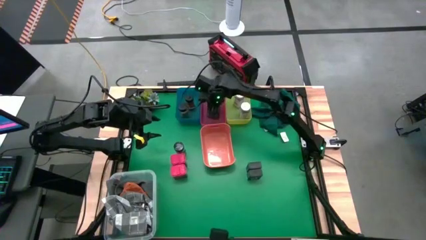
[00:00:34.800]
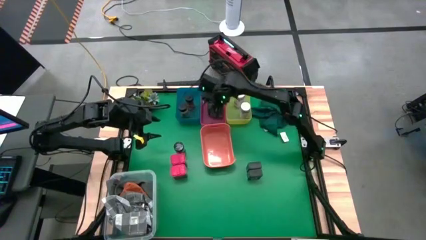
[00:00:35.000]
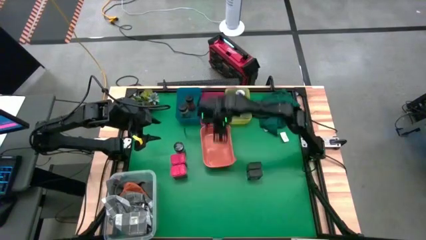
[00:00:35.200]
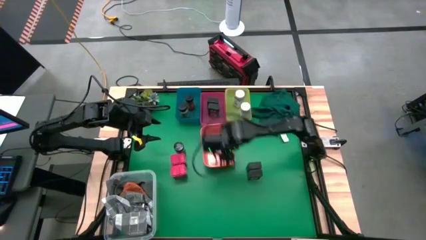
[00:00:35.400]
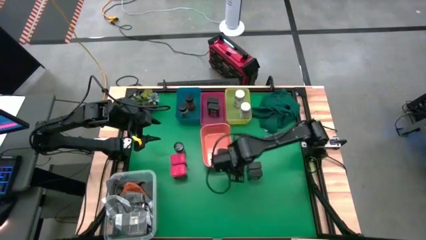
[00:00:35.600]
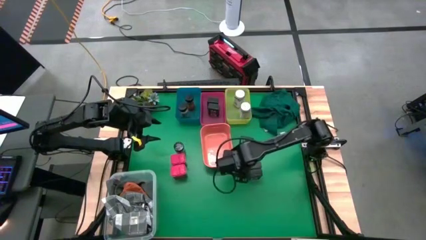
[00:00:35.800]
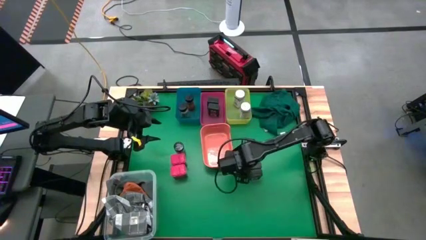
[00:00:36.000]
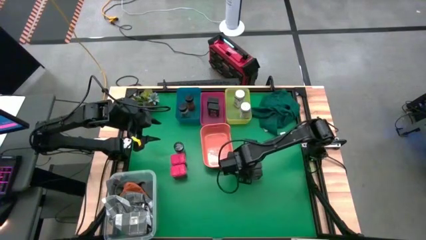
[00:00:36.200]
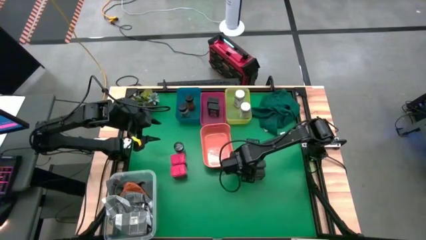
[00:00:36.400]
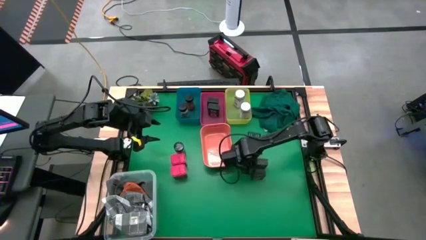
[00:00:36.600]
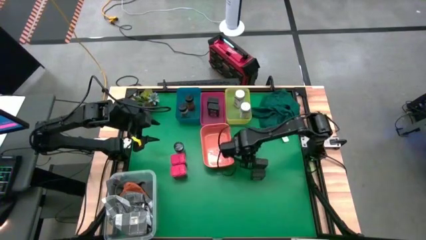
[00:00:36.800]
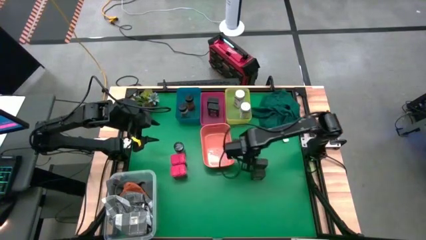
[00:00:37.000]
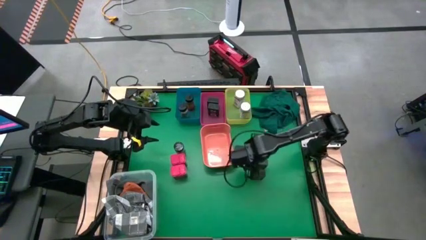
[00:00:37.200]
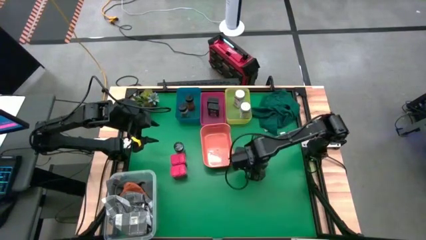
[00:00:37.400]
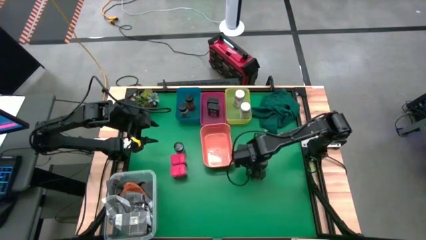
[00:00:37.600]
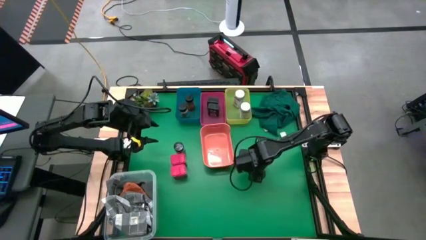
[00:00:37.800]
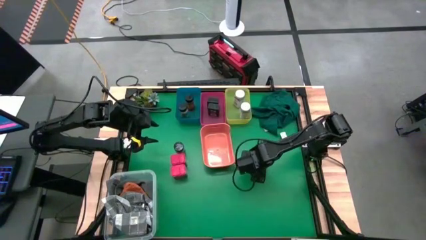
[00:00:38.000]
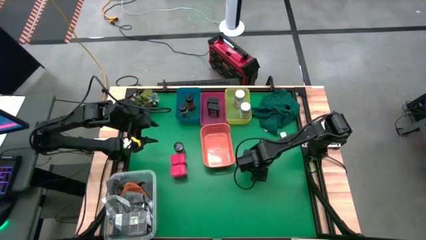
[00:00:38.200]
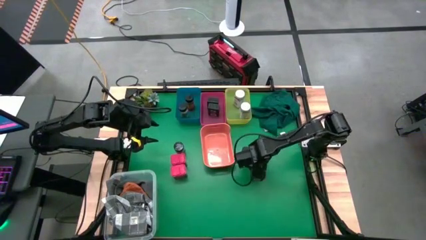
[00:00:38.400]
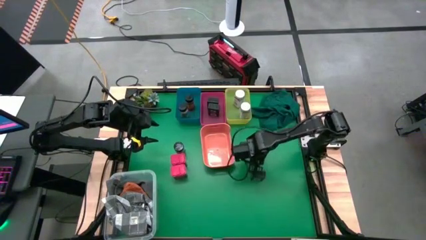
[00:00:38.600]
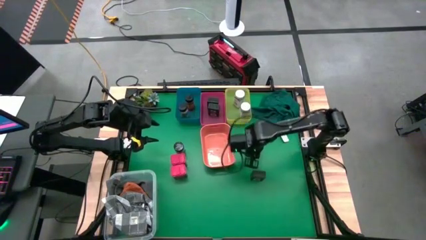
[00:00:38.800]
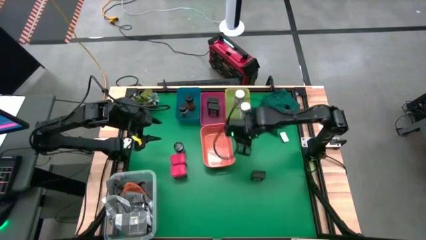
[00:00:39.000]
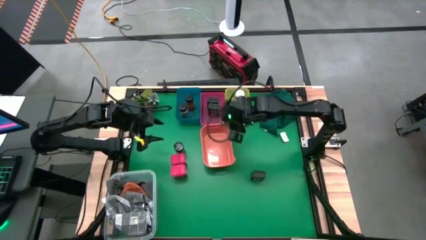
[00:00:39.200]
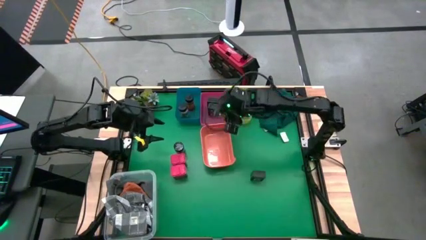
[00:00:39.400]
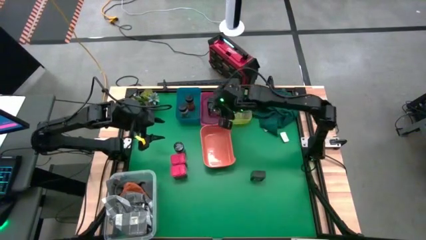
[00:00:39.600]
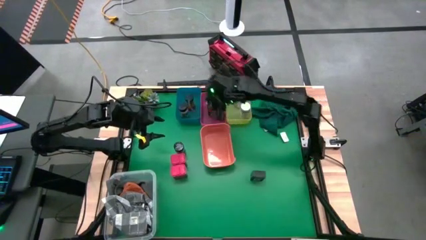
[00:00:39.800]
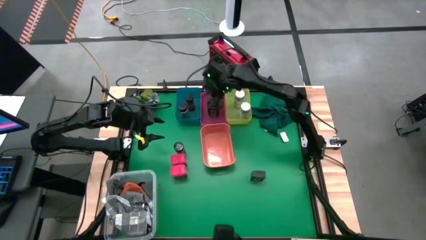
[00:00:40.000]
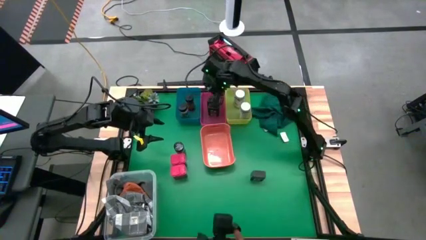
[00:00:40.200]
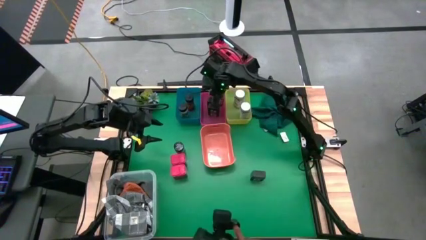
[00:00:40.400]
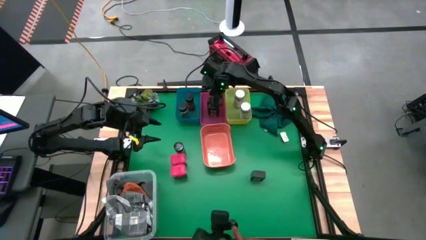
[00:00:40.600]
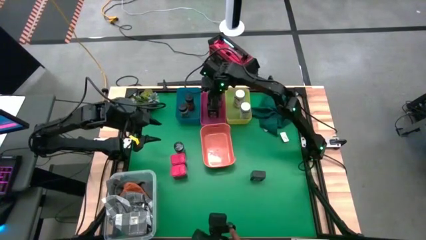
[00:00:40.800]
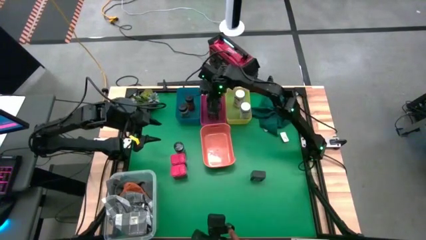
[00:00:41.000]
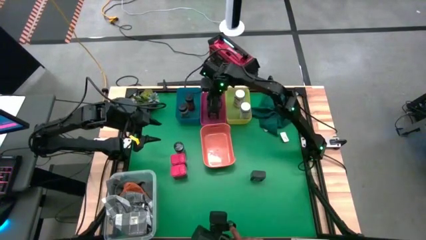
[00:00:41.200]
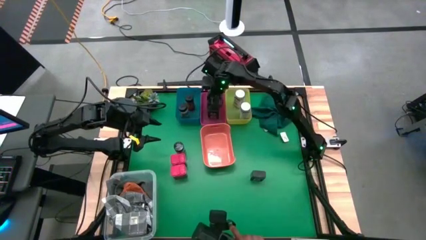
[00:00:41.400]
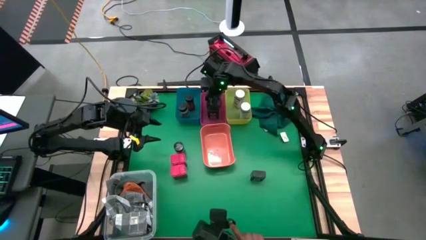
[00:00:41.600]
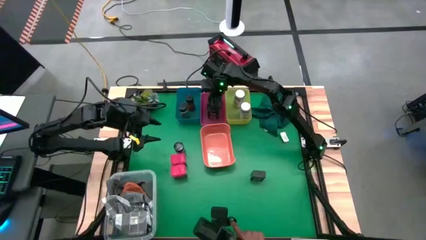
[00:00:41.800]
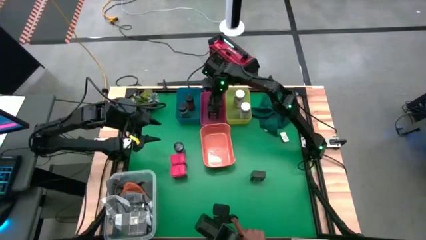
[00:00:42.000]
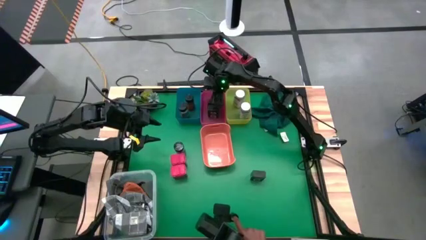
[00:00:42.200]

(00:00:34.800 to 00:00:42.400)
Task: Sort spices by type
Put the top black seasoning can into the pink bin

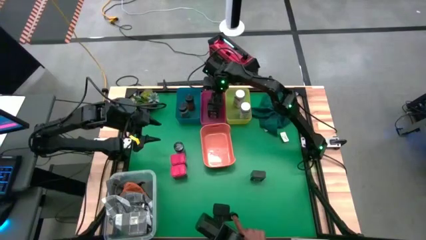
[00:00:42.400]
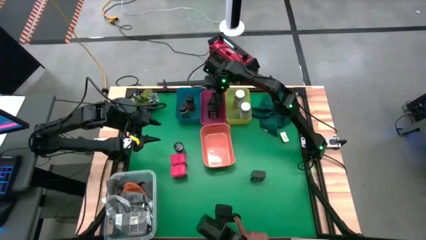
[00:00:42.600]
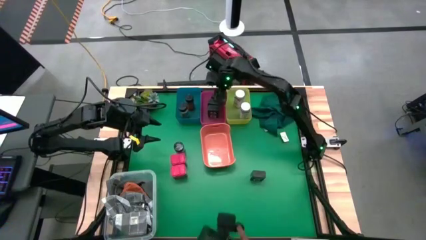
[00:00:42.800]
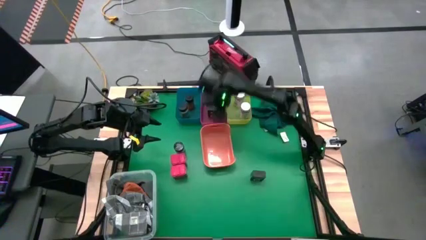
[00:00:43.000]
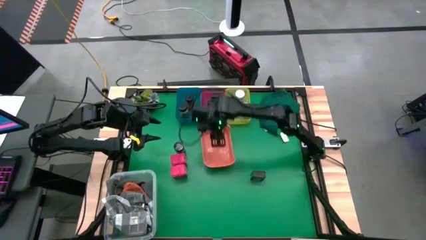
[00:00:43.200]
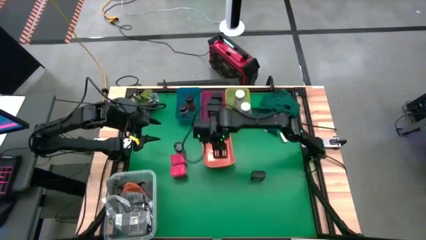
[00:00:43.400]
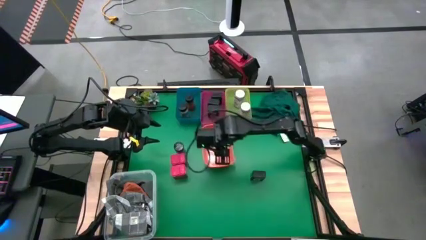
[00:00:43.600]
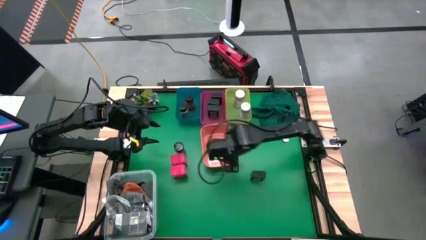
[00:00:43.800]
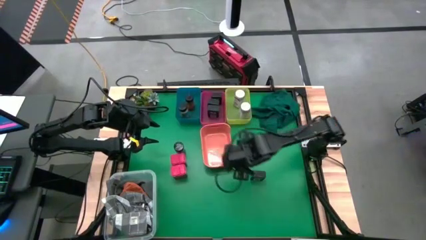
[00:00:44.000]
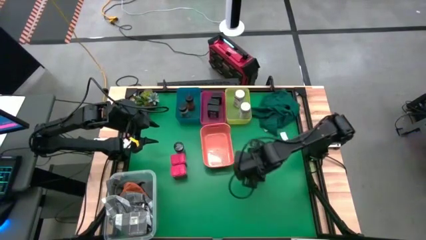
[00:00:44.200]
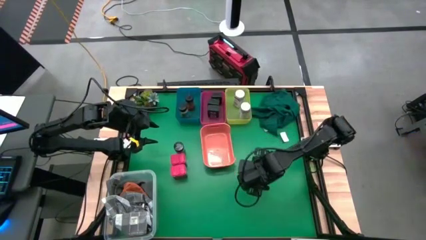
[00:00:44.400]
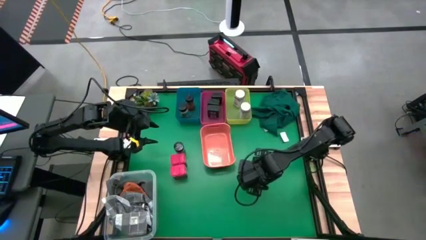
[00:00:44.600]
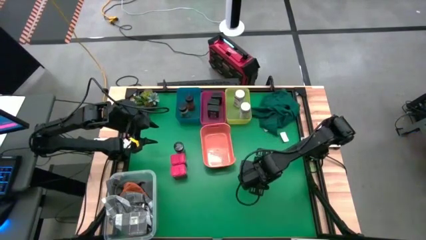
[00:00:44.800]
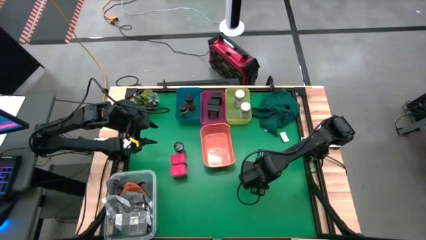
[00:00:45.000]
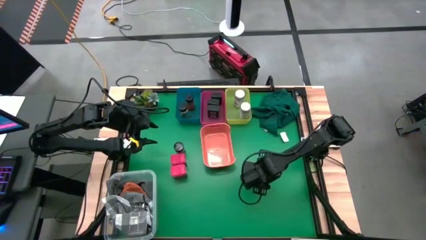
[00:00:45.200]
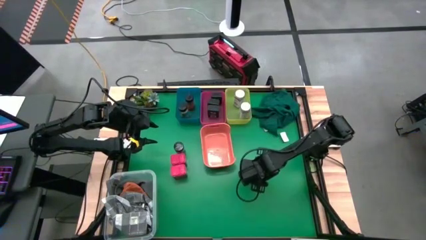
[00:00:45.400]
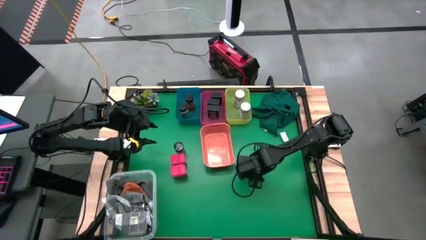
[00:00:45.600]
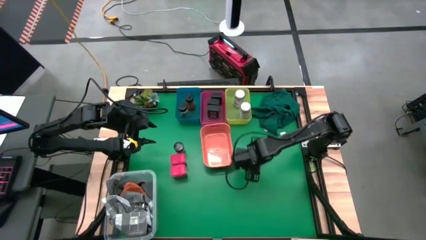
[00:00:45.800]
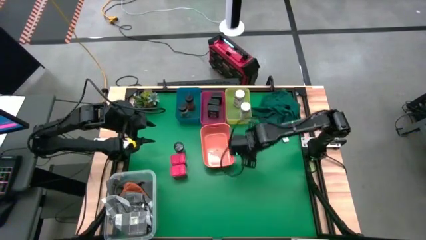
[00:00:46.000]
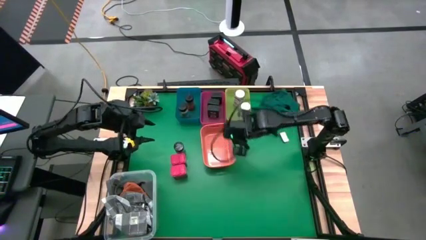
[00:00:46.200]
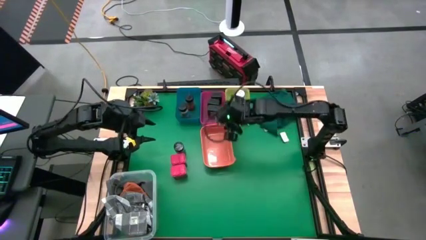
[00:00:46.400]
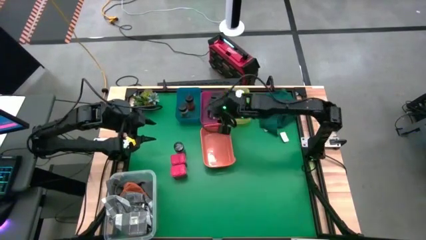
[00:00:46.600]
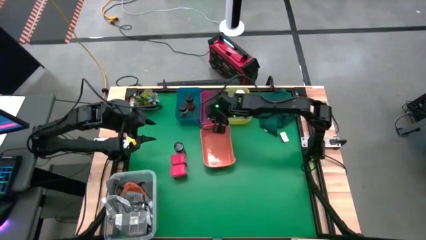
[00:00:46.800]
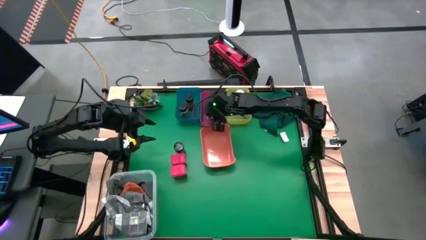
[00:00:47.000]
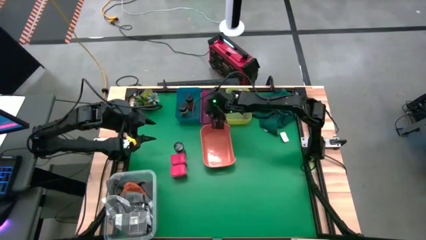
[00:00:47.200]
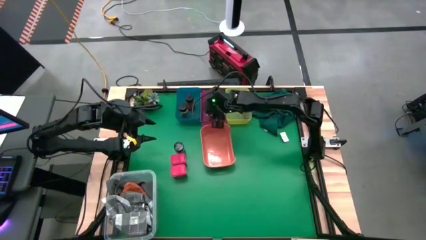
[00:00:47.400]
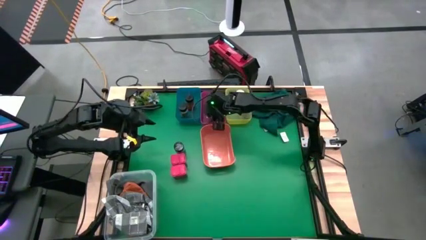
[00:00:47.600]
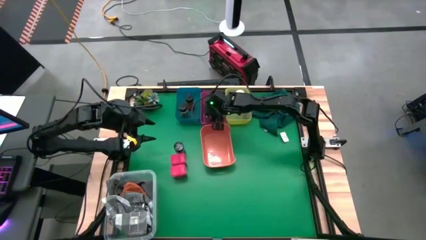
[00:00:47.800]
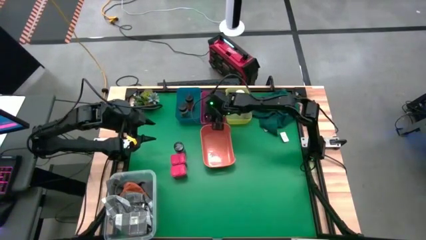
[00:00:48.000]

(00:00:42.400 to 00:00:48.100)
Put the black seasoning can into the pink bin

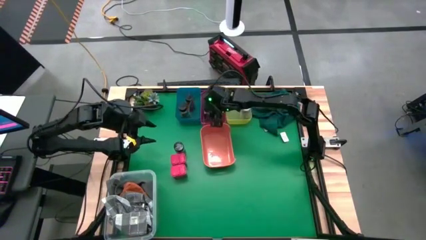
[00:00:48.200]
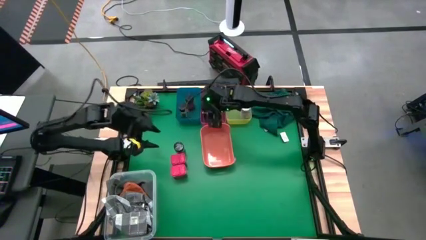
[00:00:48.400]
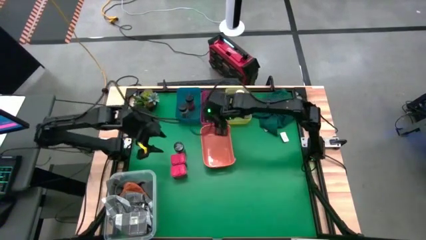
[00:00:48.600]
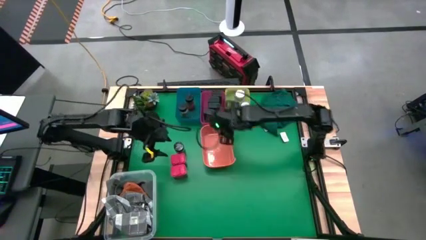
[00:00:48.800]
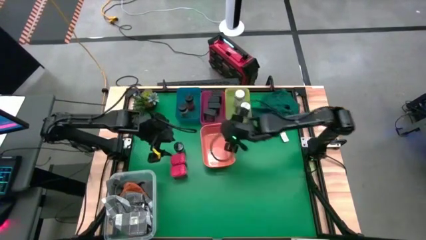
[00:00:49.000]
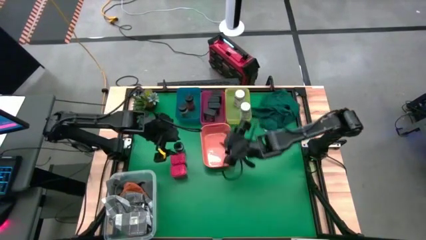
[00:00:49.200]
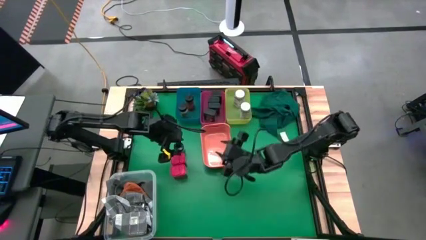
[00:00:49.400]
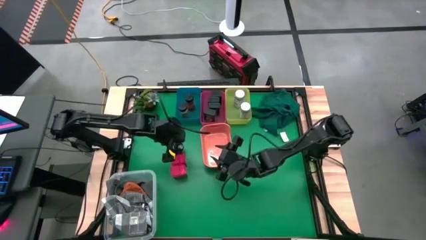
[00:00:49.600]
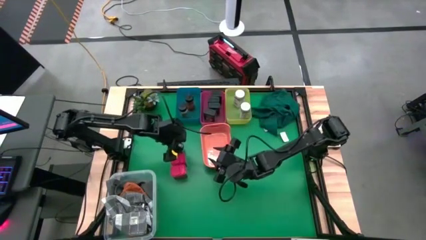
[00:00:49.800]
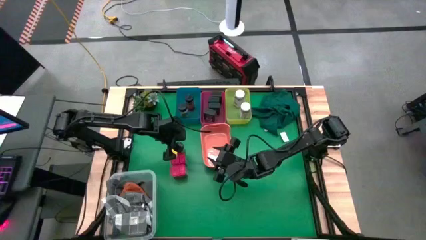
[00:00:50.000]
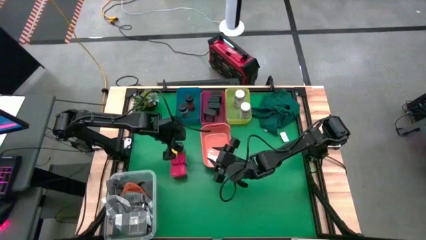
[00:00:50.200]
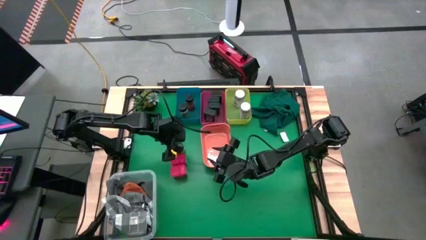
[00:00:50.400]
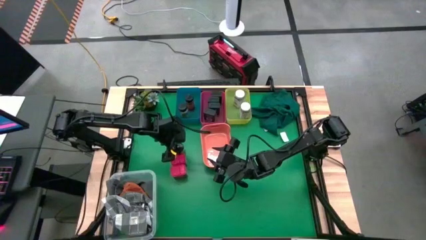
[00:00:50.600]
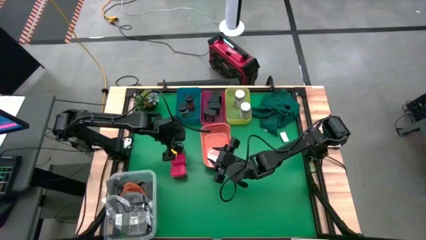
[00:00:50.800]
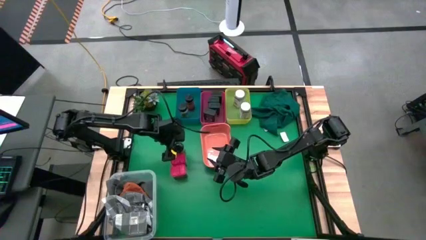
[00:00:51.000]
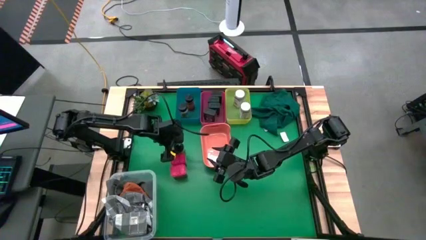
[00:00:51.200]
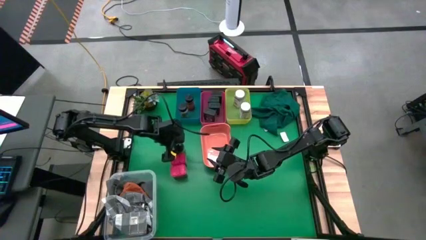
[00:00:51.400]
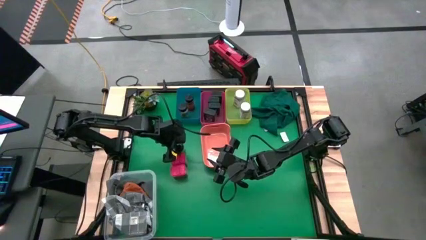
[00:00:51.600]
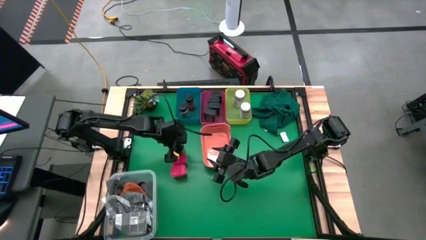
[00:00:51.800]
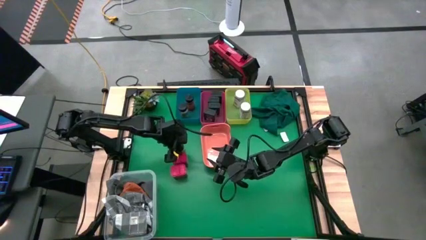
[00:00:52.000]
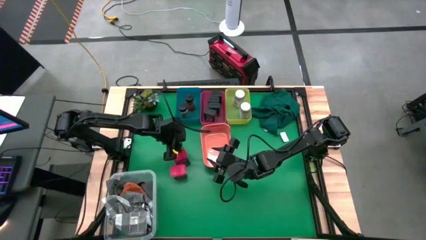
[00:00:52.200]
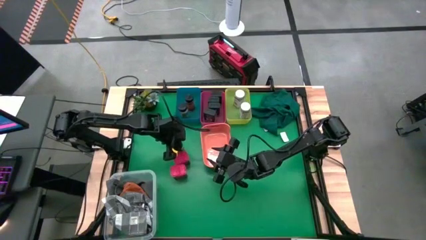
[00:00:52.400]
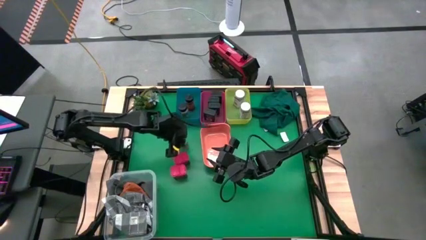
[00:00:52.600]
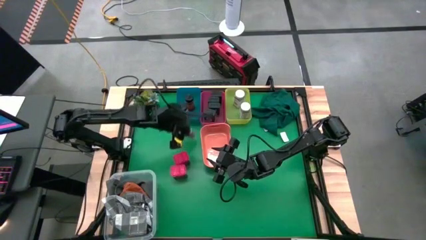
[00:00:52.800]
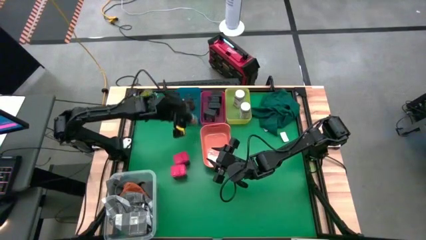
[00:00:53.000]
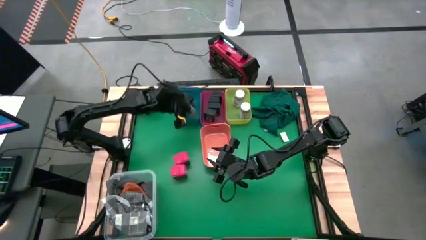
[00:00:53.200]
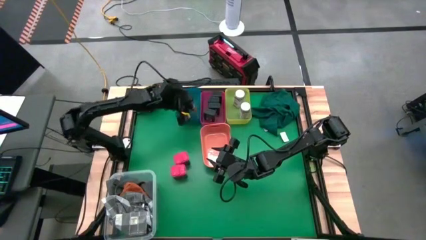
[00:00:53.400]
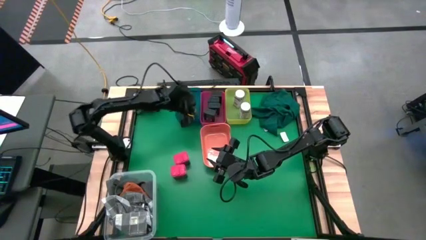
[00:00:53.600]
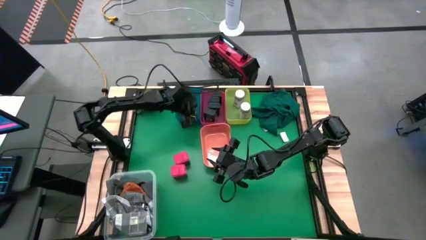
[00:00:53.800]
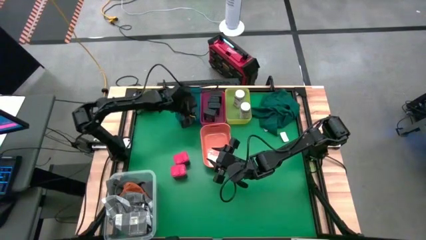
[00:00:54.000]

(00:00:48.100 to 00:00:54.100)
Put the green seasoning bottle into the blue bin
